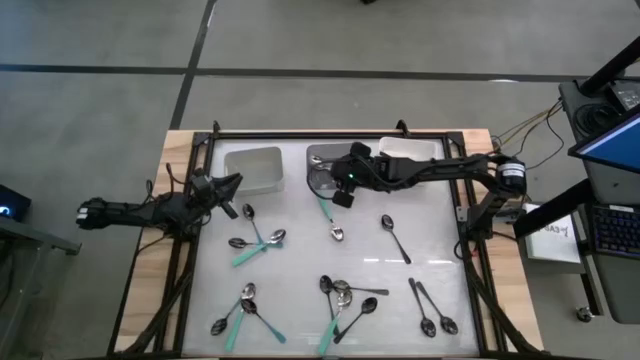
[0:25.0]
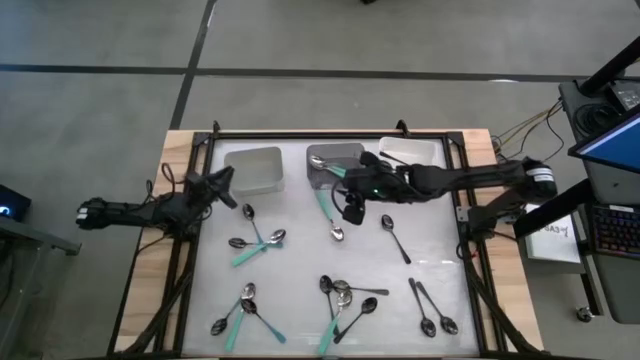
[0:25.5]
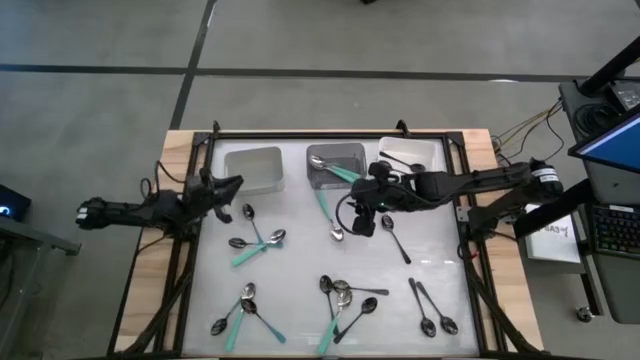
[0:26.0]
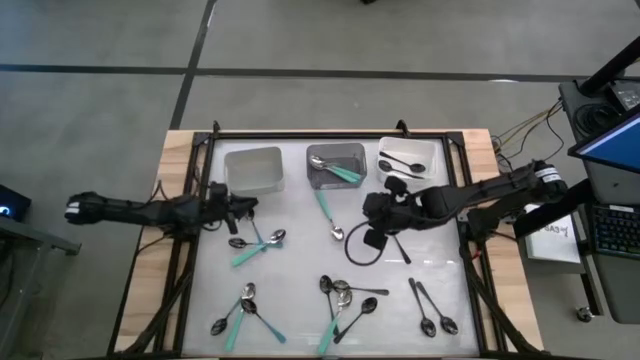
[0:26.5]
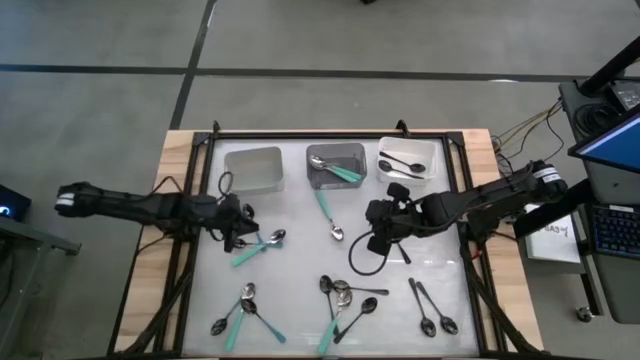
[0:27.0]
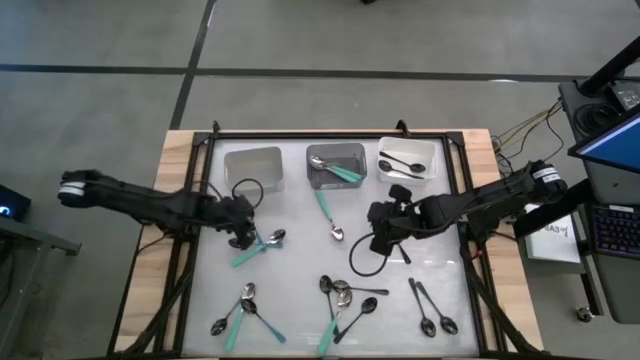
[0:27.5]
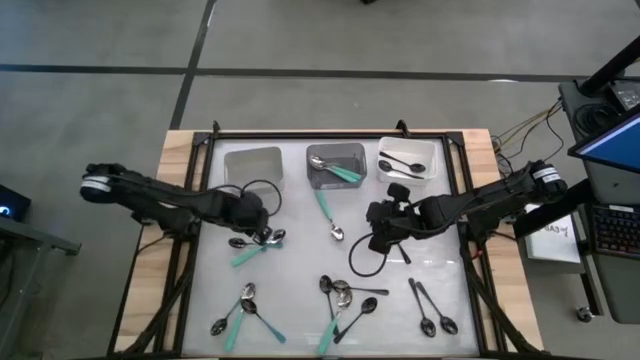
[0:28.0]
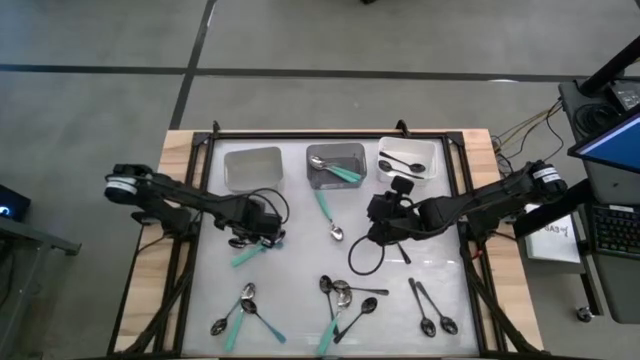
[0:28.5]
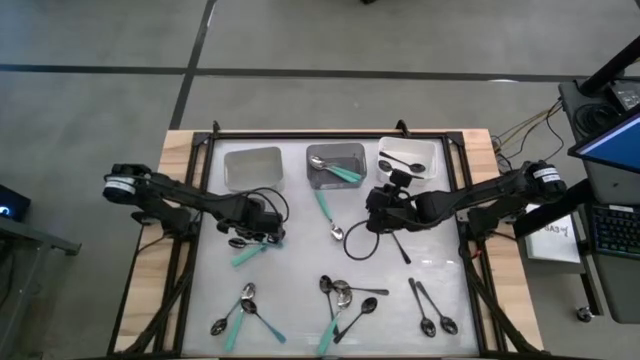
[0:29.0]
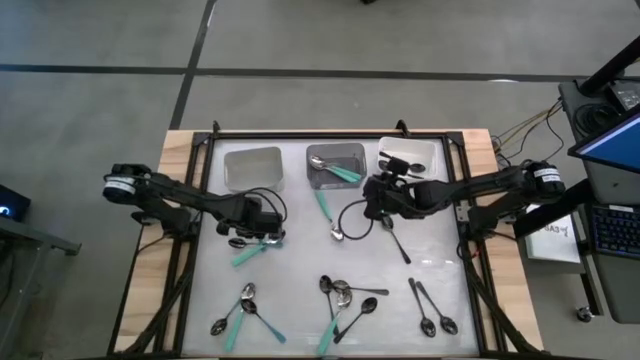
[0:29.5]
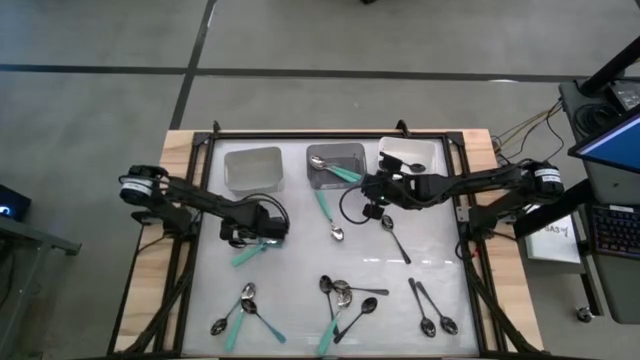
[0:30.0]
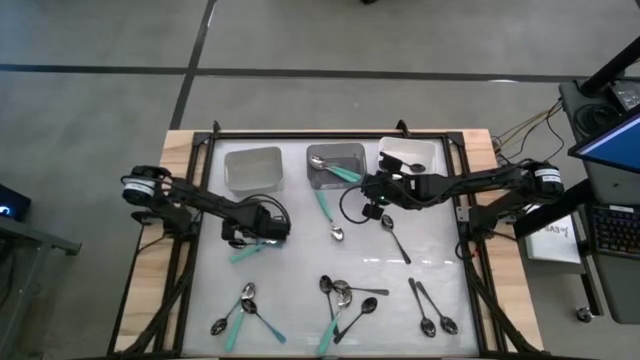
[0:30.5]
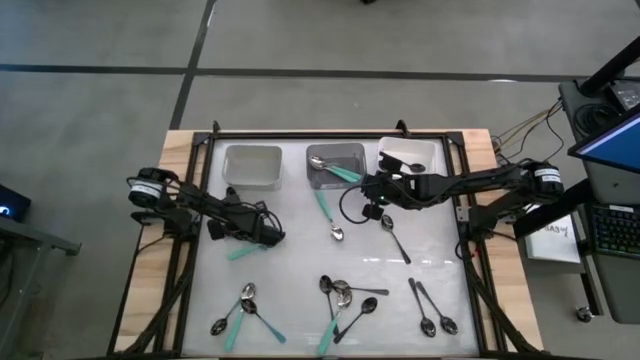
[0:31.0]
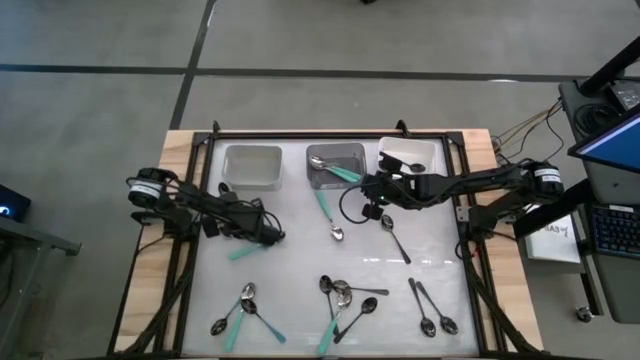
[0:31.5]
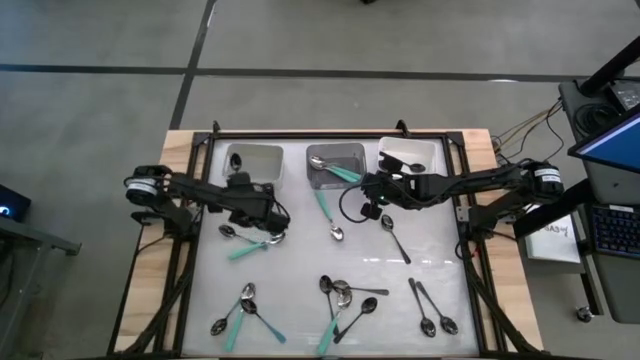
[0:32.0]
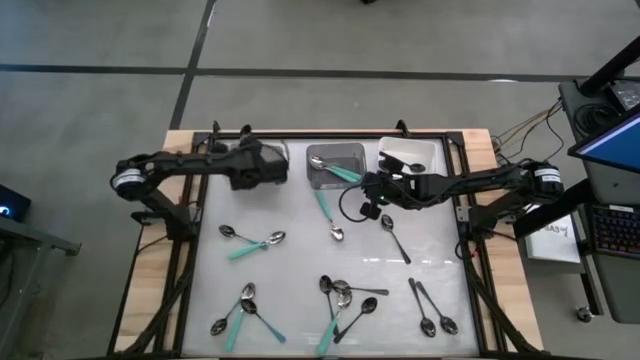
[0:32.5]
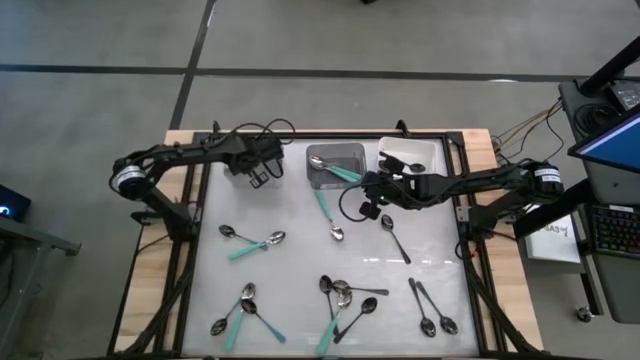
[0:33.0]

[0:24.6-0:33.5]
Task: Sort silverware by color (type)
Put the blue spoon into the gray bin

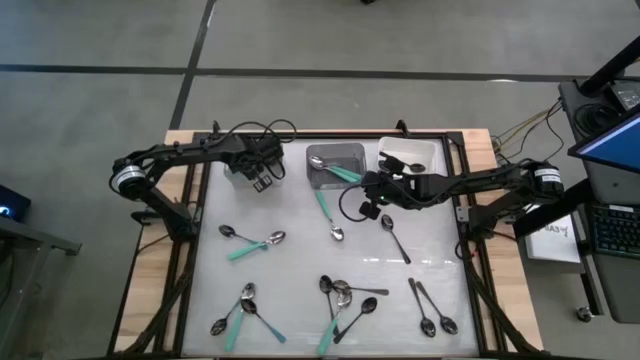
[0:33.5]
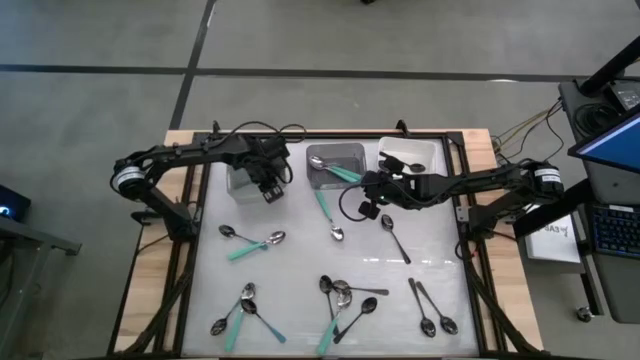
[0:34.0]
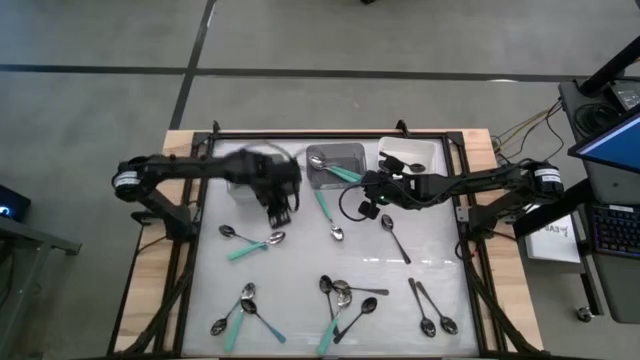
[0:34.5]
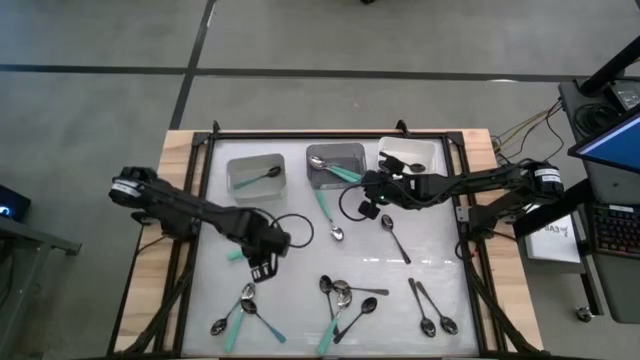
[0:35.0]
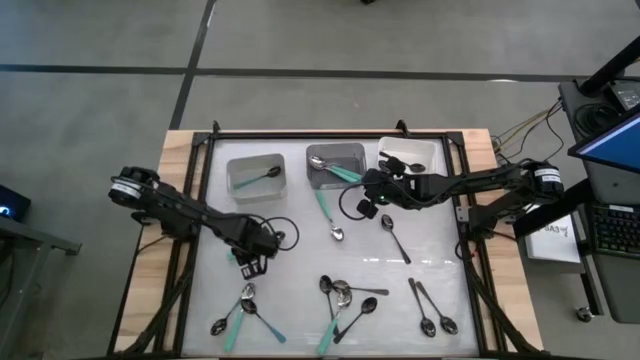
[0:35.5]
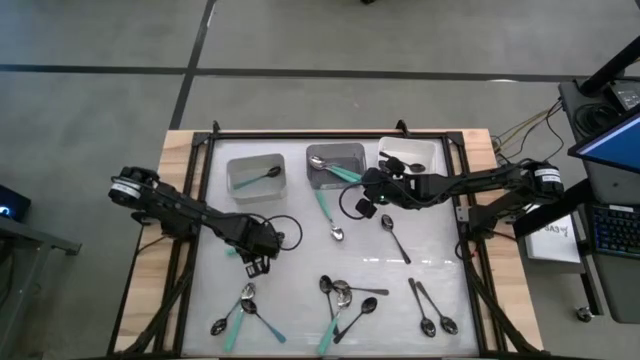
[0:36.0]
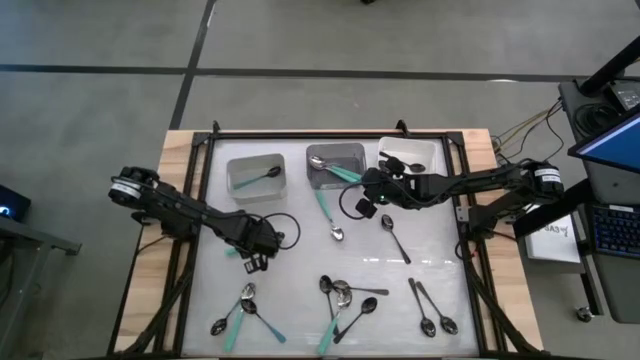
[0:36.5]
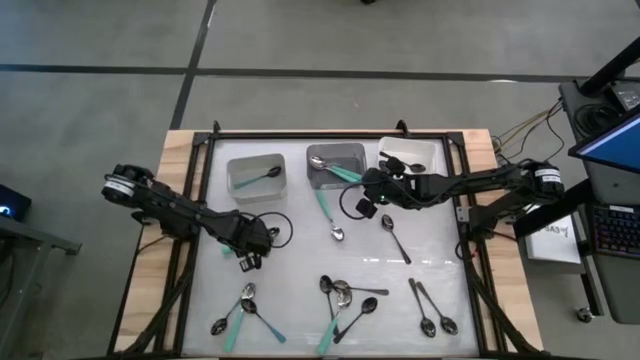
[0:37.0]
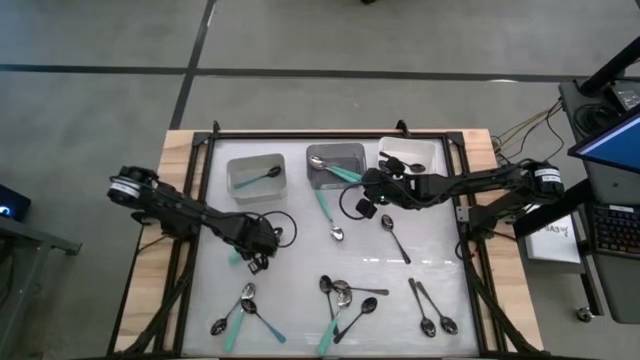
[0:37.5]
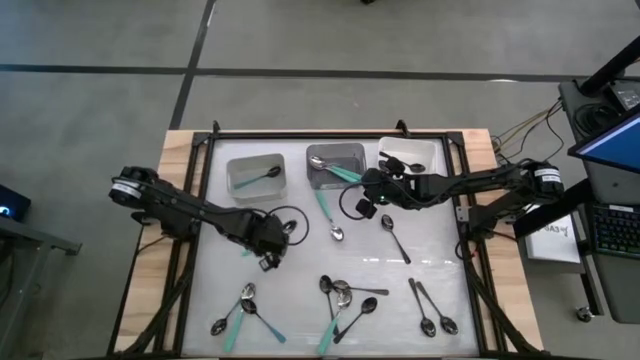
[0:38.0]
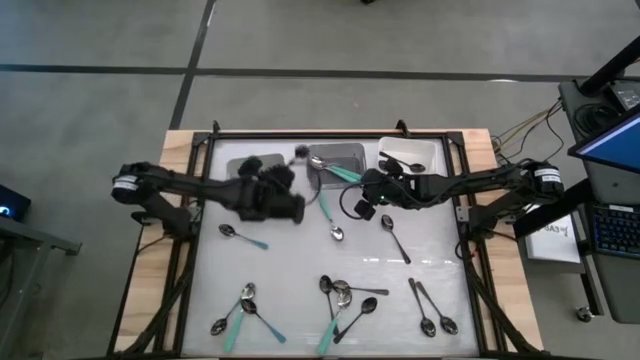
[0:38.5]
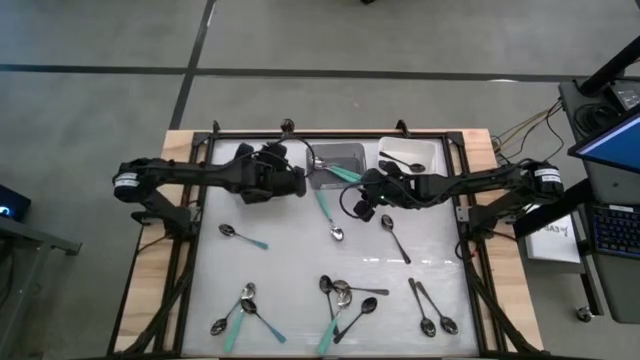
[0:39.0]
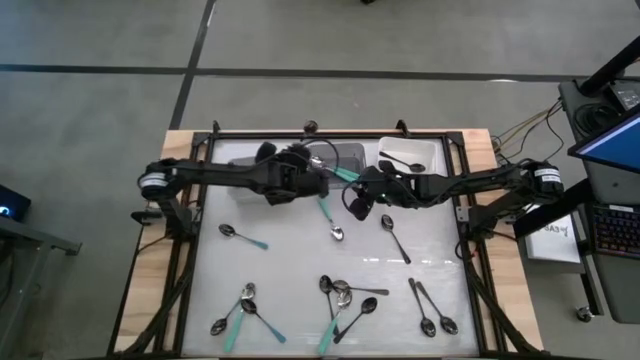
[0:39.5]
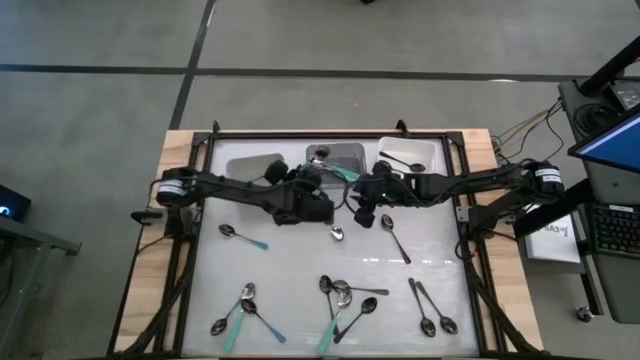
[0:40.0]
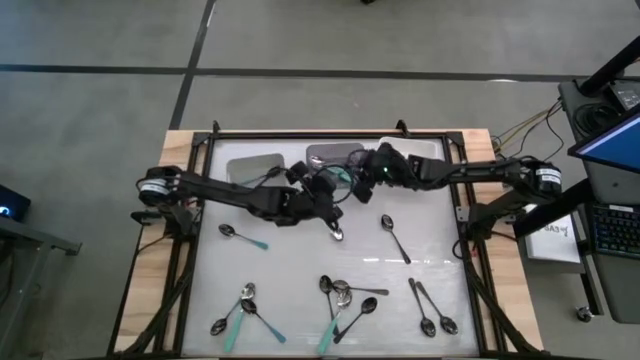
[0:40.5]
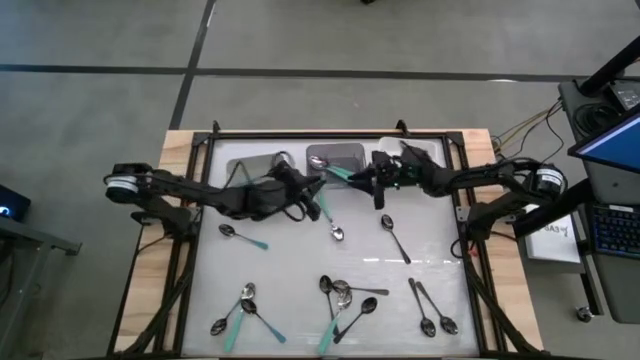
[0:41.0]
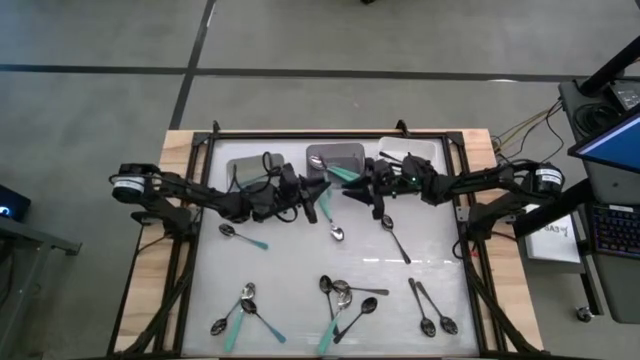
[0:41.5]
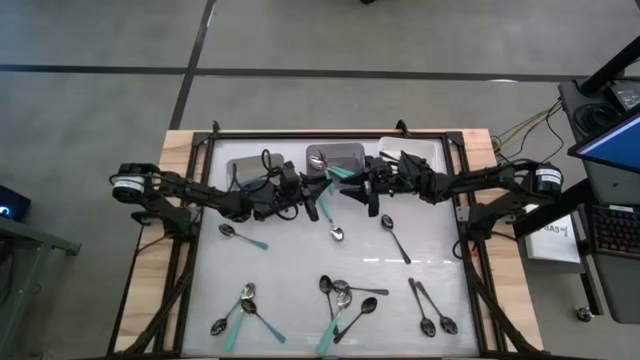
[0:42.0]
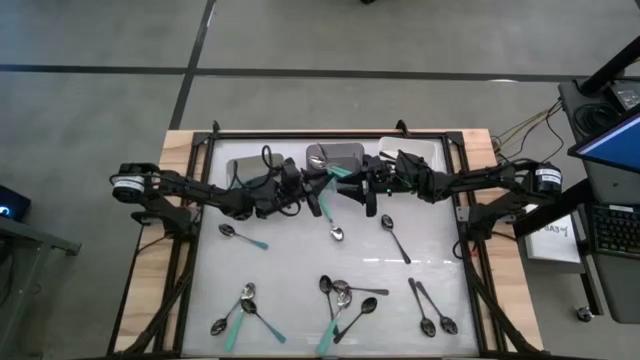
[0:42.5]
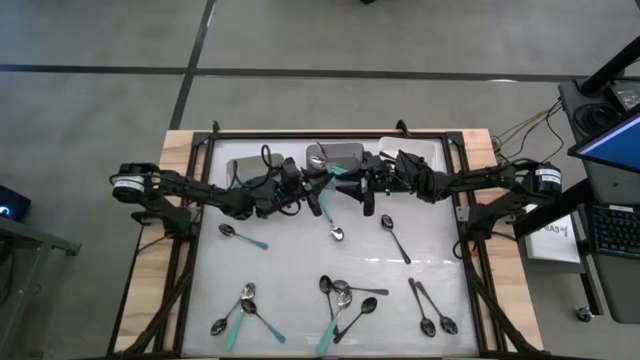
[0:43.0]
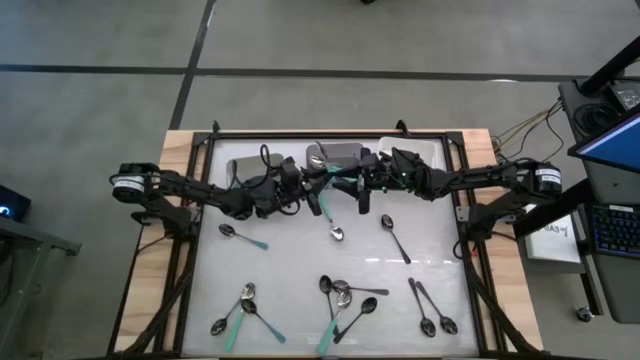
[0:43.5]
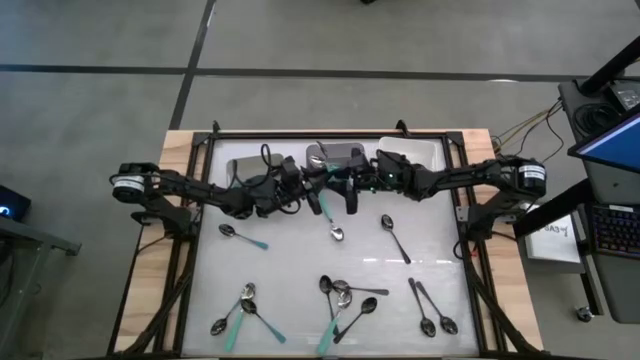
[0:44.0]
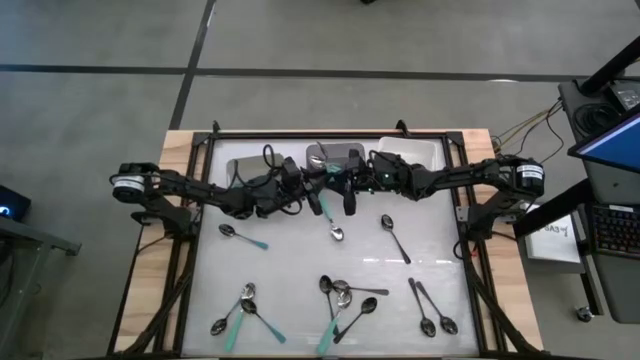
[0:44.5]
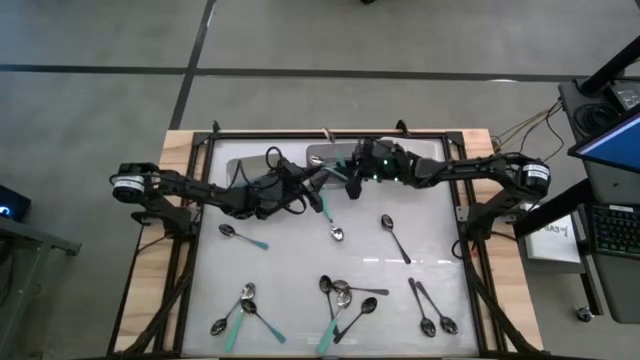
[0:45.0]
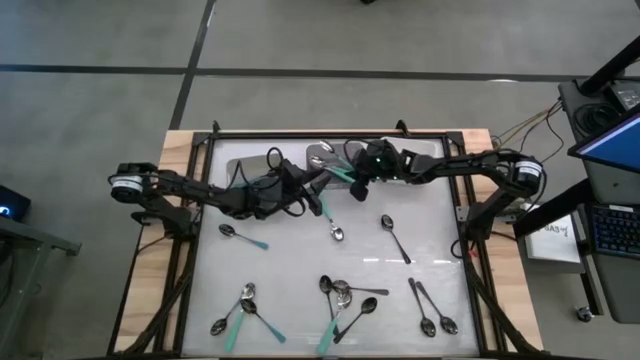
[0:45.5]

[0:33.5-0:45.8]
Put the green spoon into the black bin
